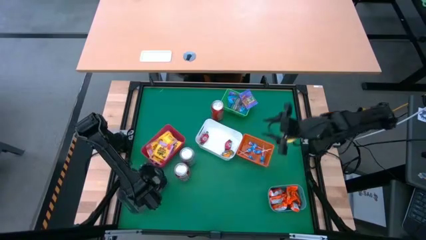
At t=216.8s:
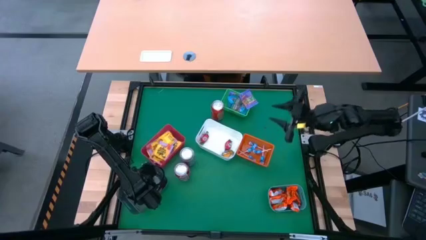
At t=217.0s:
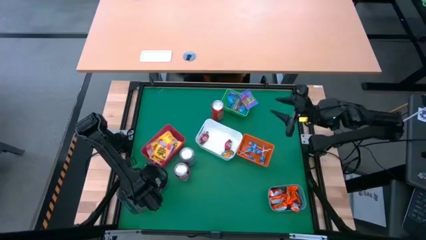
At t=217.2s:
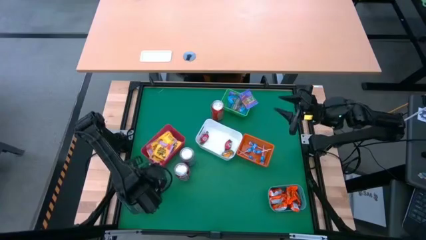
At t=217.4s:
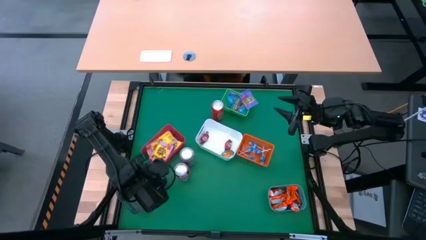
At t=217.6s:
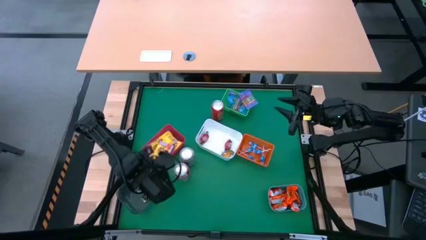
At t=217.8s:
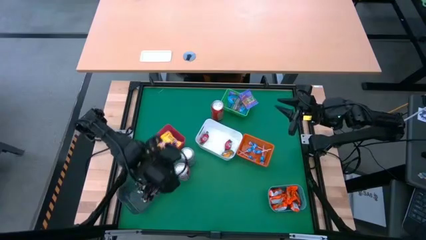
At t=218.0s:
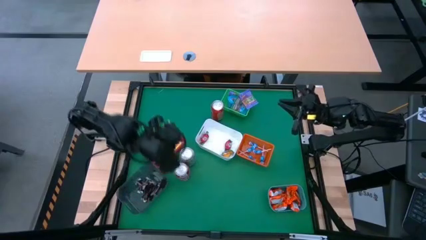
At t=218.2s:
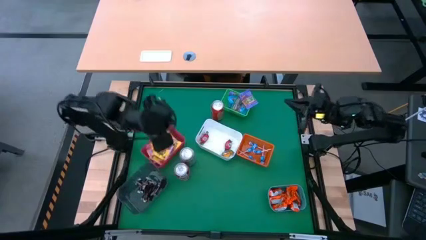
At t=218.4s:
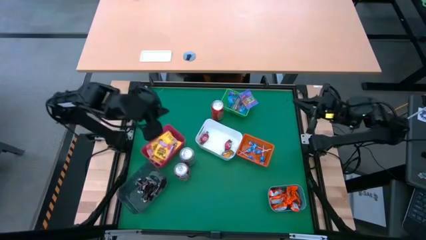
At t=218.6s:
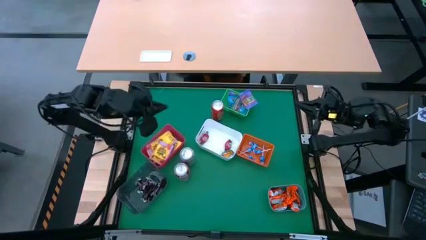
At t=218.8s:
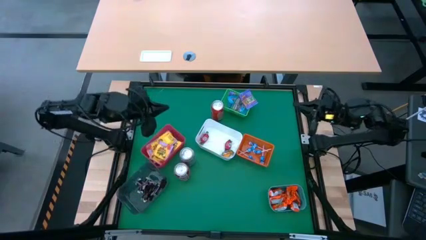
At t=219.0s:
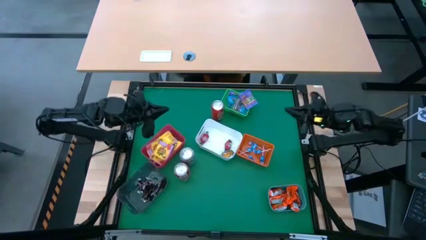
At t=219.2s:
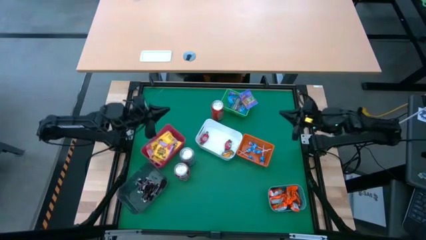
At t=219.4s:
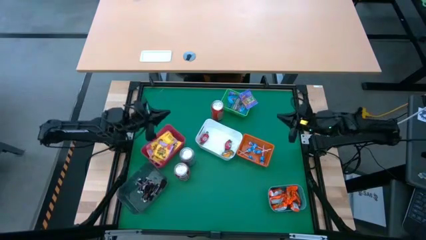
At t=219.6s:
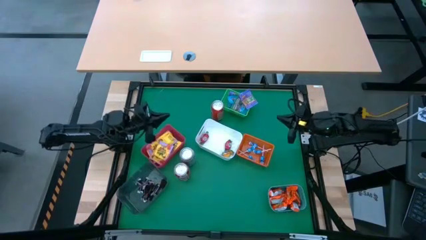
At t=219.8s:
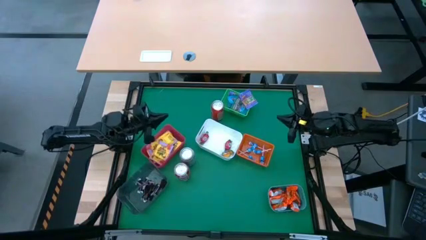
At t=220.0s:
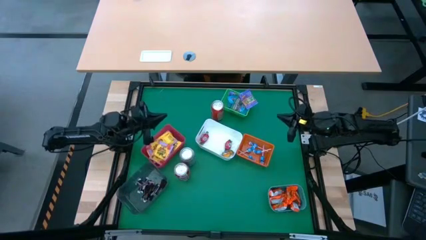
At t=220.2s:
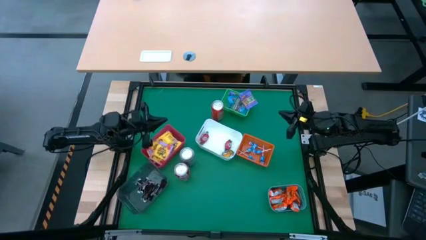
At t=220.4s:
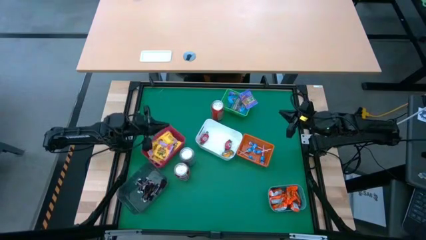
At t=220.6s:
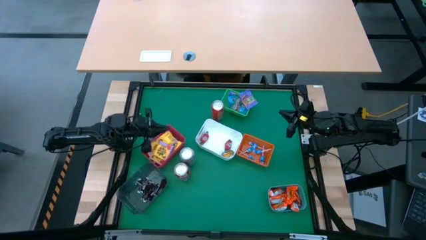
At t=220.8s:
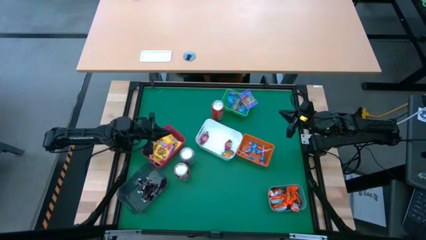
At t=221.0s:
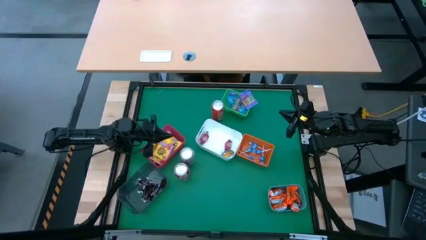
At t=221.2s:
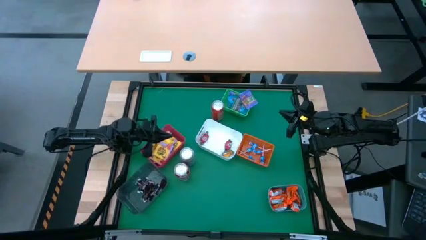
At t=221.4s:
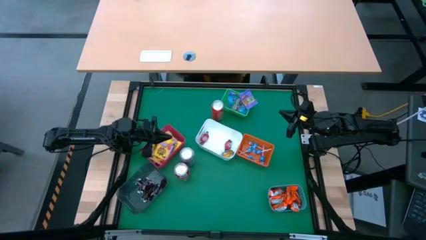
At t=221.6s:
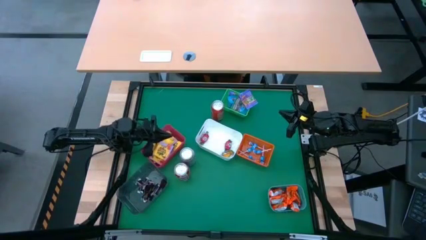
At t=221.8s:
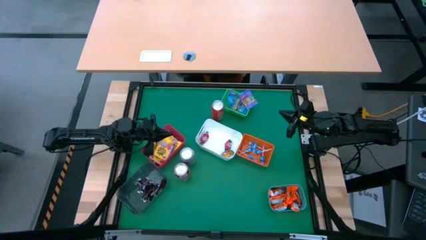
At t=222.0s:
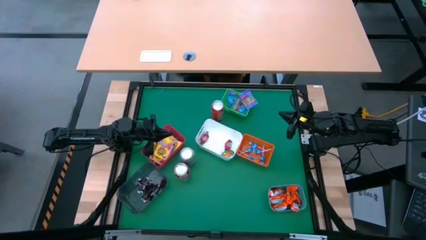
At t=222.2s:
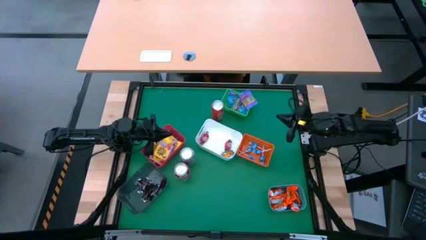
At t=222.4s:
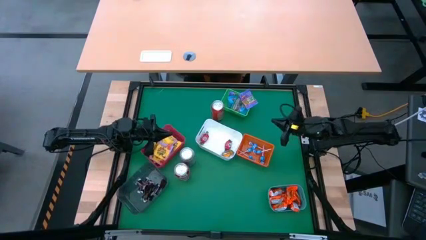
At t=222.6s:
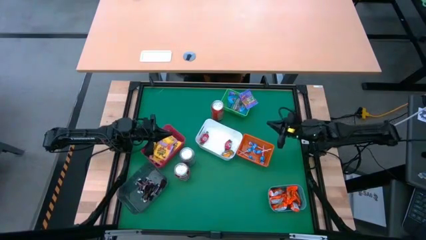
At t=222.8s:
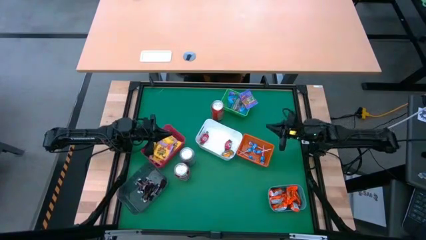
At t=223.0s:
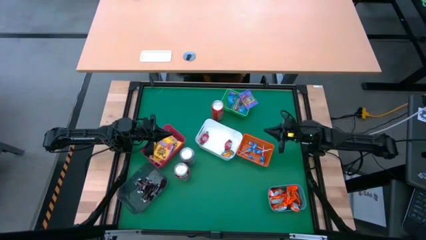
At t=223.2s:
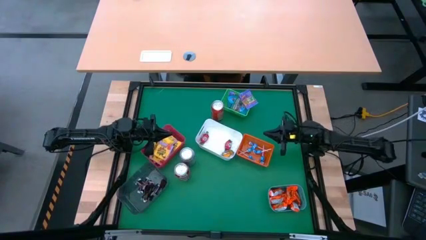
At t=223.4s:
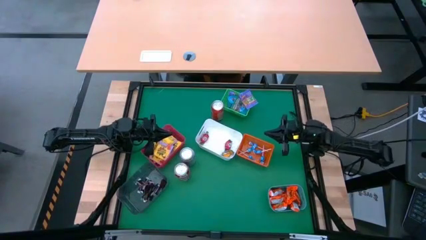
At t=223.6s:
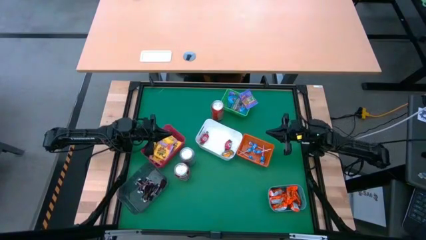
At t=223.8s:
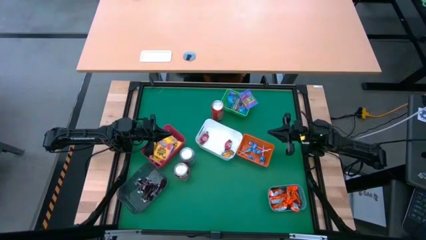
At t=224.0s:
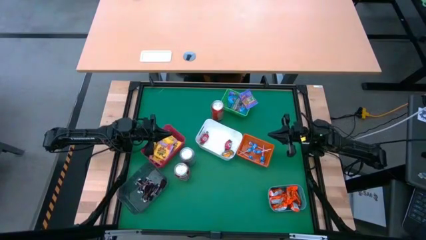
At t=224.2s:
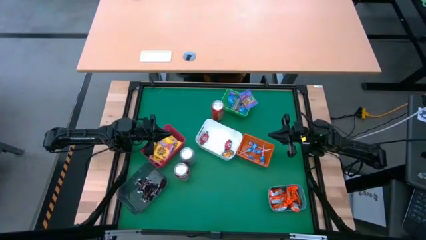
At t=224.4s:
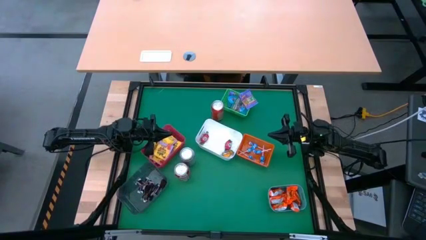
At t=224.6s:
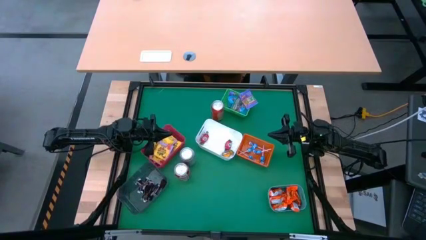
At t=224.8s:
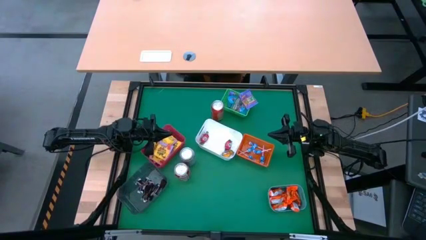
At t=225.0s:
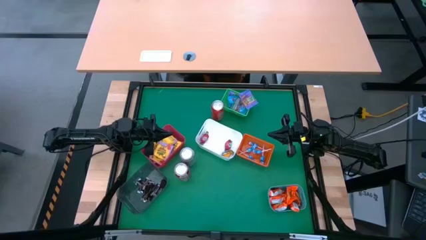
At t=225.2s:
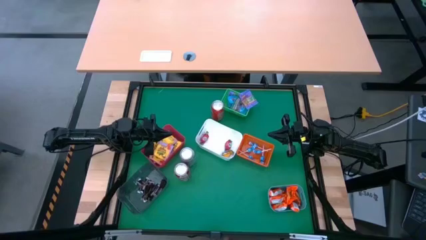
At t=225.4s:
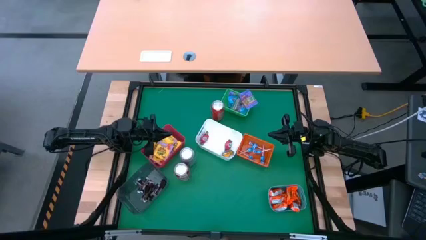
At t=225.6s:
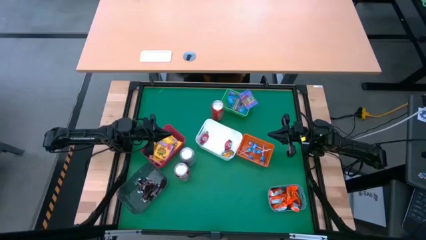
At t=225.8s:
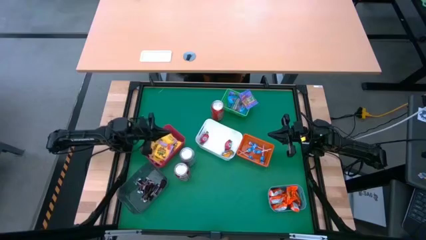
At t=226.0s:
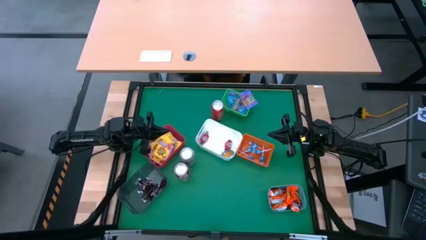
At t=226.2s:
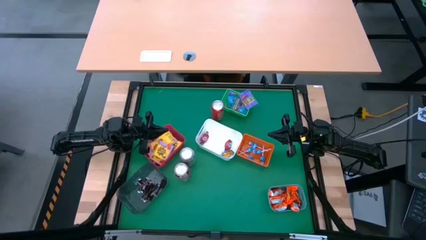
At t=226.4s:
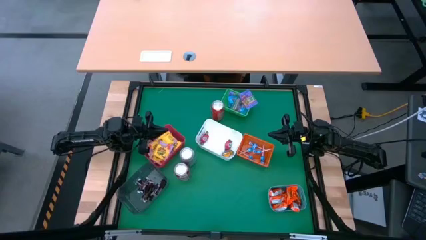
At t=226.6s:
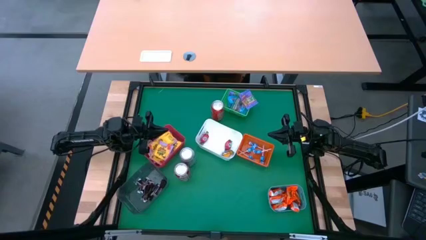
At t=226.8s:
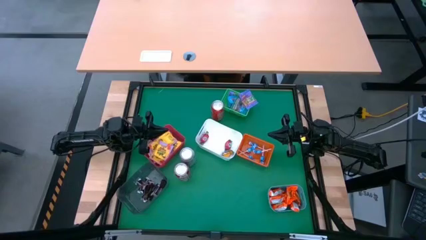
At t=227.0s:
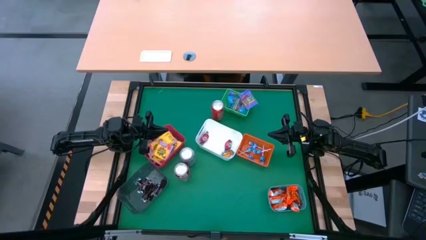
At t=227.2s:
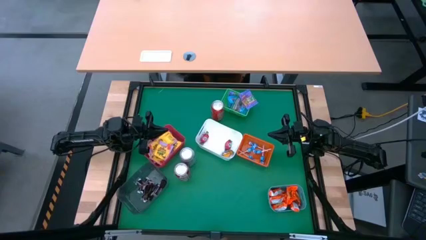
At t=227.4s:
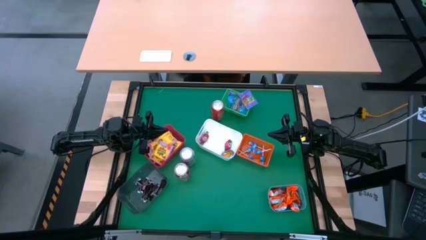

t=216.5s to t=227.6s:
Task: Sort candy
Return to Home Position

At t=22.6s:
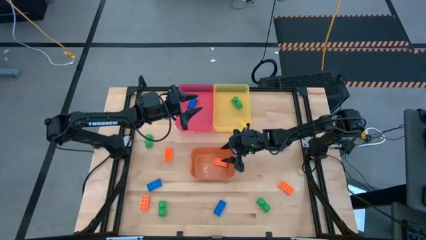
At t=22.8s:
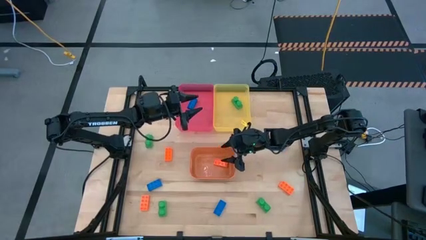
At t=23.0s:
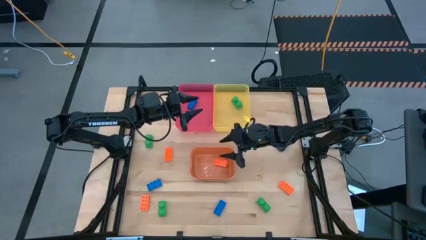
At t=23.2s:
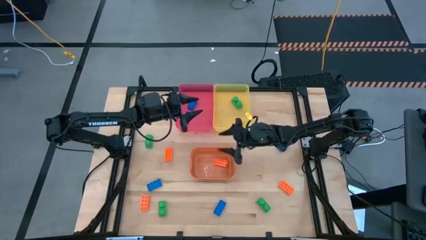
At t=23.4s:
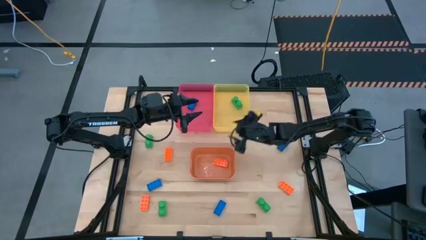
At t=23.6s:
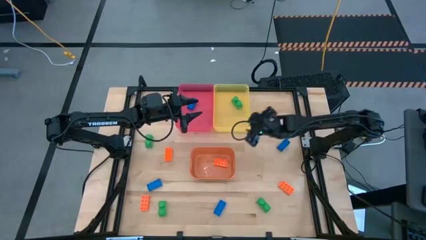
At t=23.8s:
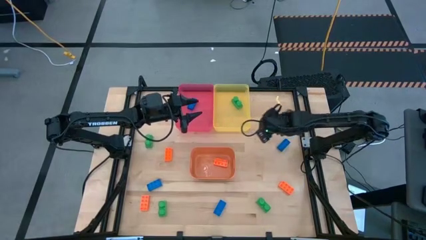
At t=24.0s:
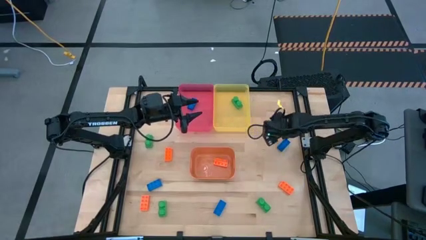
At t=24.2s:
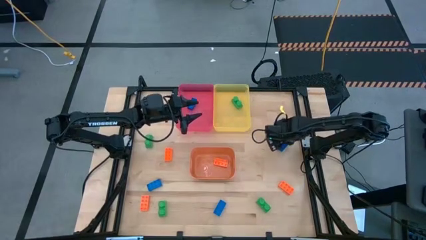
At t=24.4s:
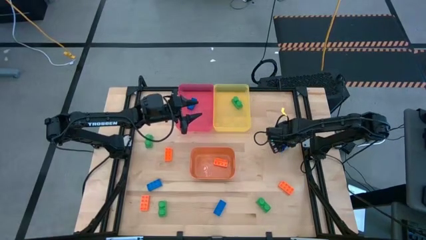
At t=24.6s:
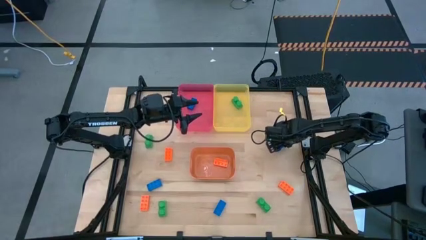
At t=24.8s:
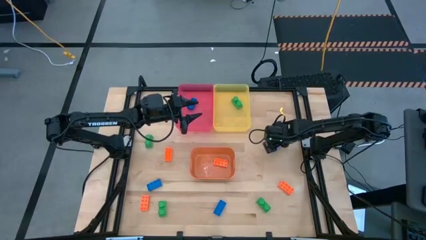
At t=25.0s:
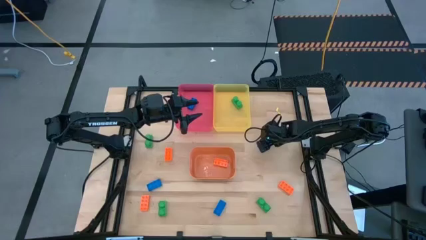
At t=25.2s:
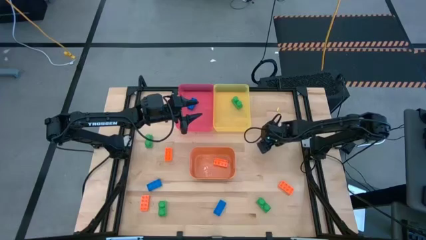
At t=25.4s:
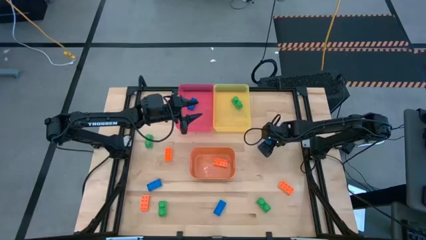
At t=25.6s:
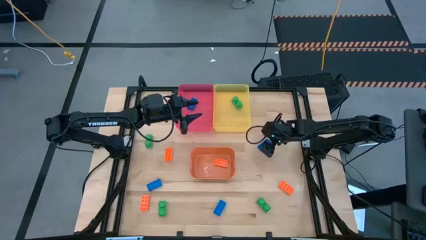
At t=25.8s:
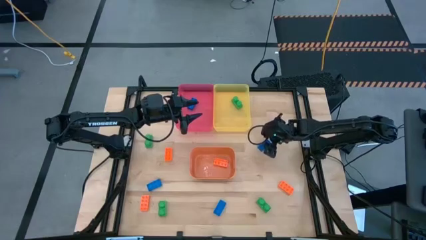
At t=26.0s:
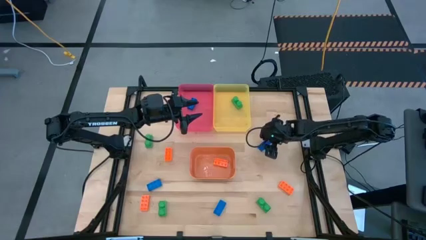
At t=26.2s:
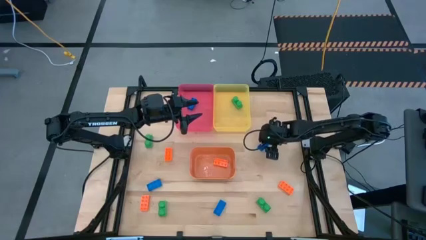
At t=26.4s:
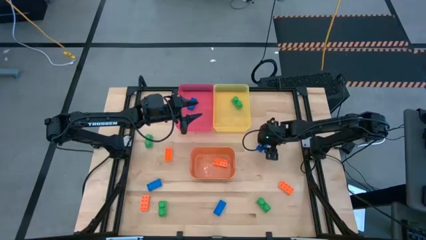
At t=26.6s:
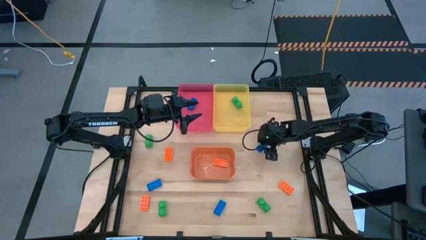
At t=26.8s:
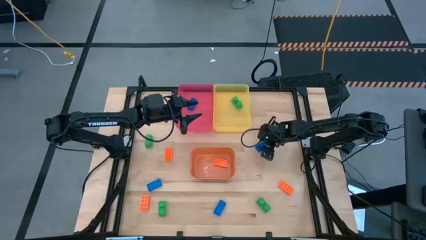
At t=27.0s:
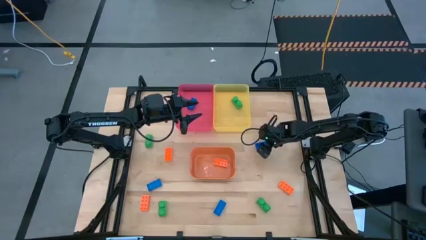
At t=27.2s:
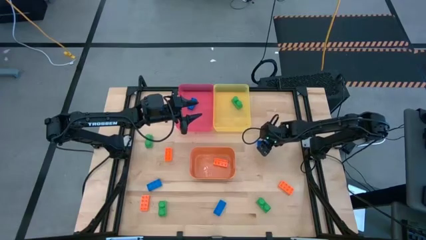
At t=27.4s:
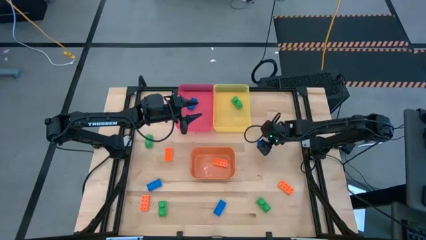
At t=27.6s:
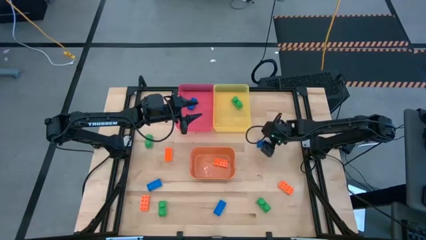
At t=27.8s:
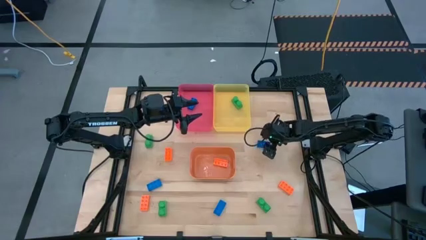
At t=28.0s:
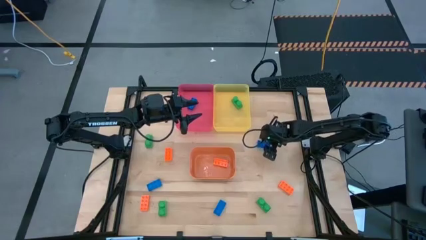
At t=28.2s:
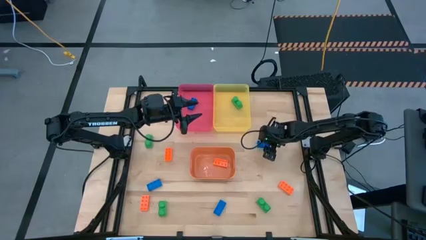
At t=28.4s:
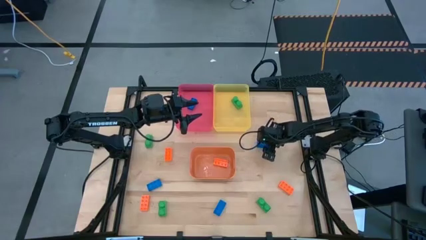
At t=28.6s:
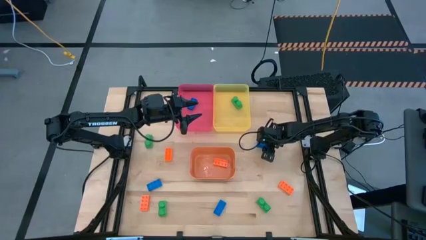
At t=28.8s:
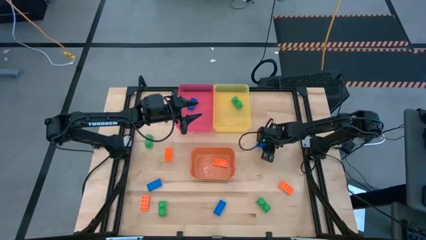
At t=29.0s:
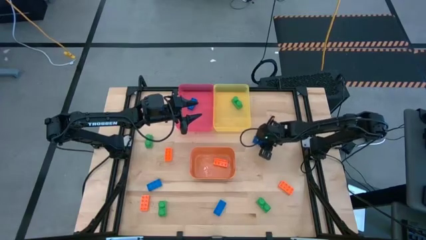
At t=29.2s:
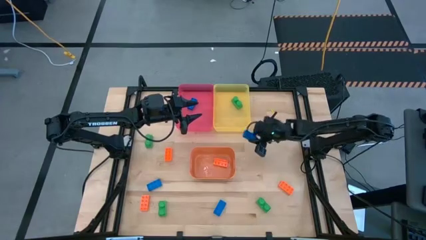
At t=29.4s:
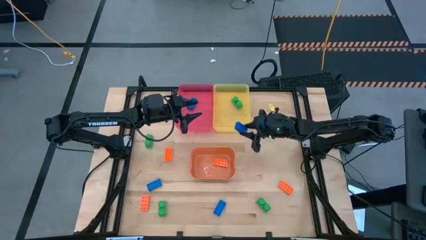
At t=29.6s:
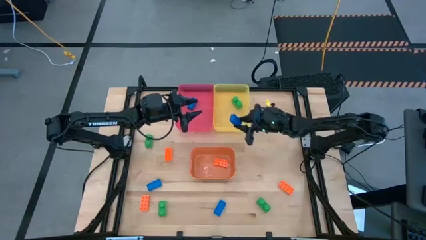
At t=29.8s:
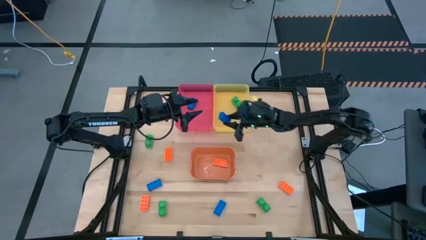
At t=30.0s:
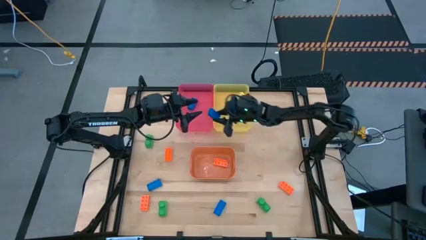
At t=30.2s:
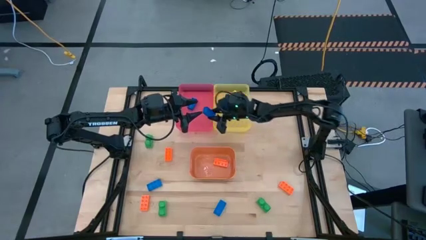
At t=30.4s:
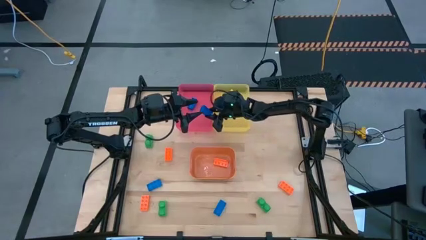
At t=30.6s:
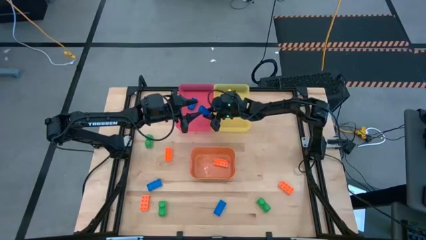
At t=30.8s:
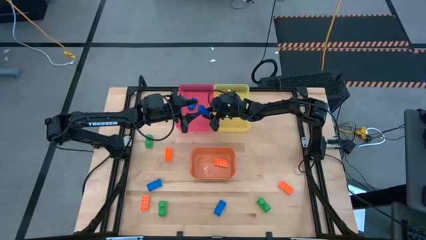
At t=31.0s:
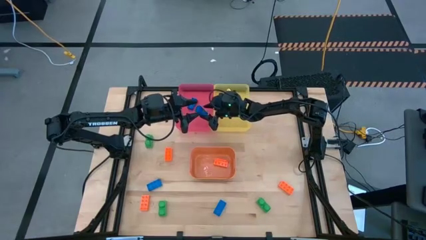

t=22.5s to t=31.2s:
Task: Sort & place blocks by color
Put the blue game piece into the red bin
